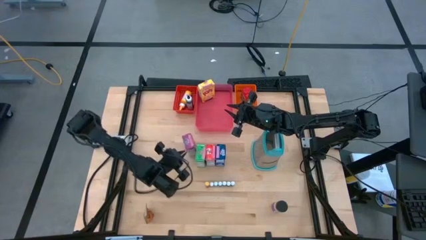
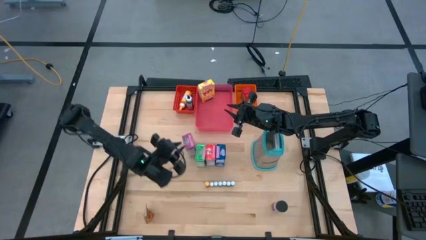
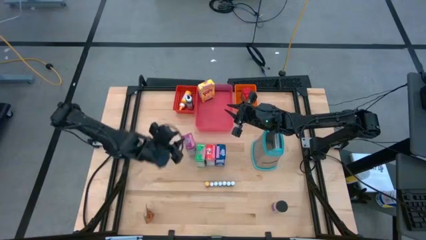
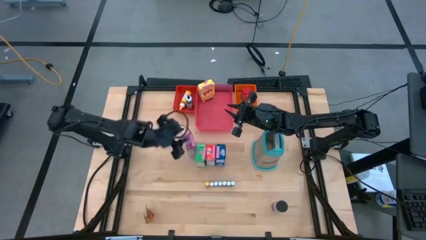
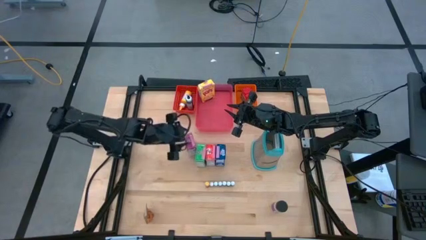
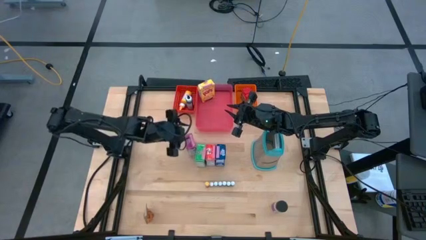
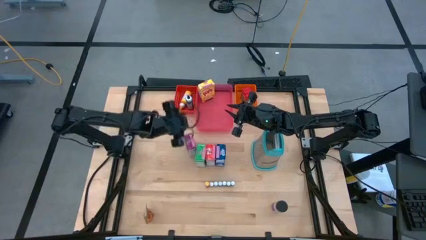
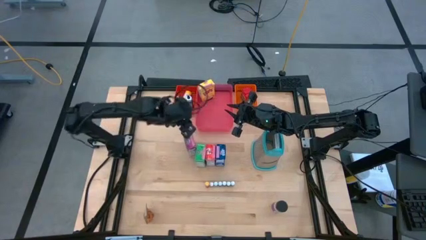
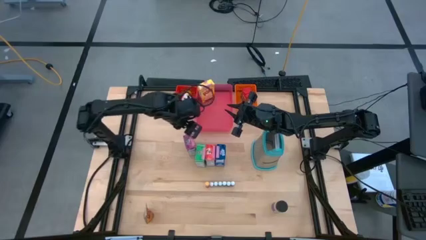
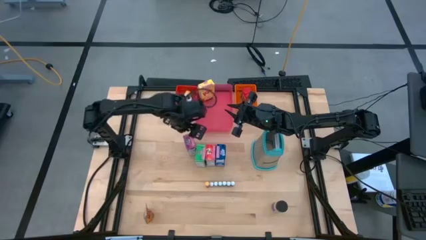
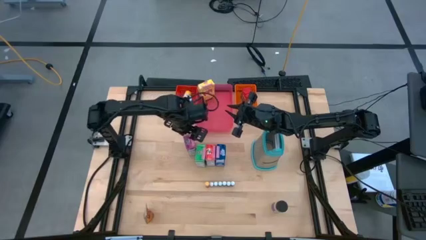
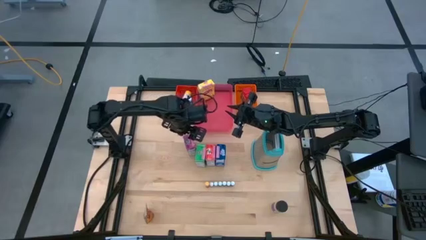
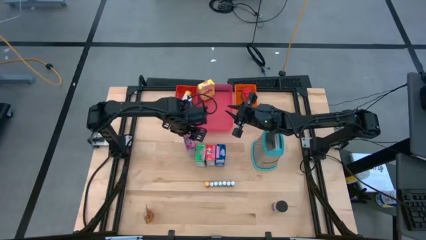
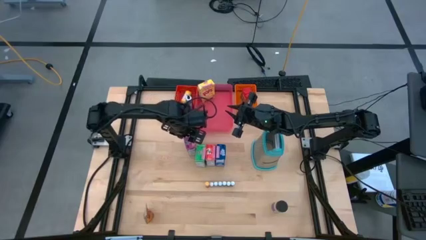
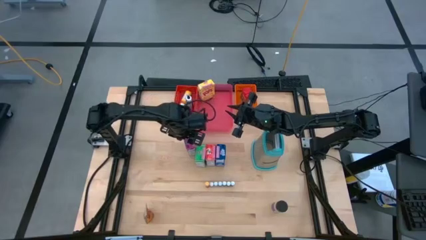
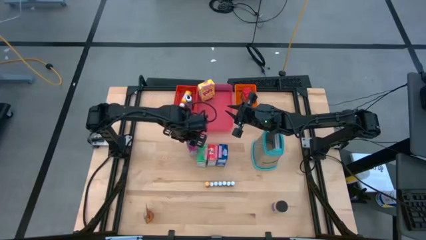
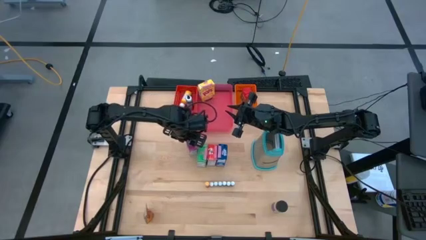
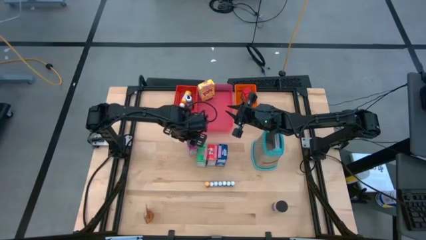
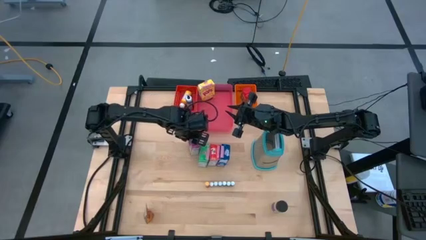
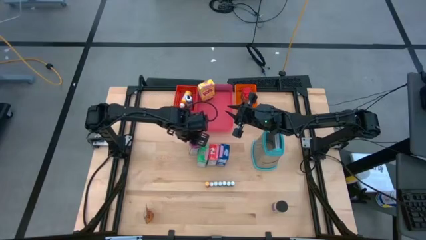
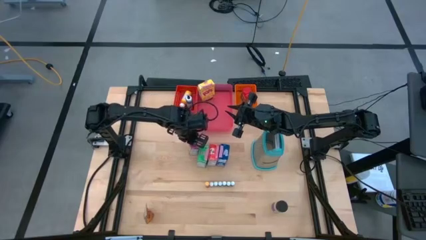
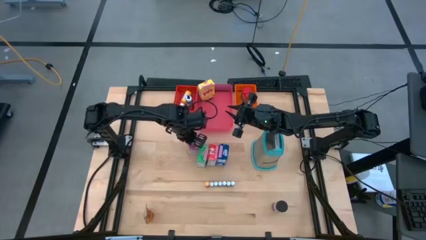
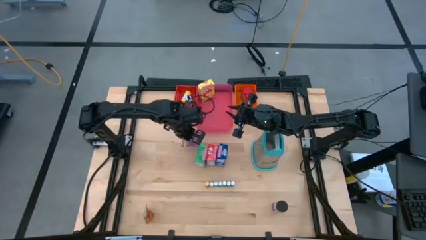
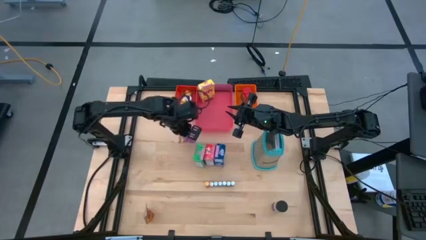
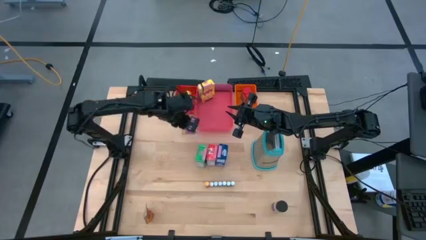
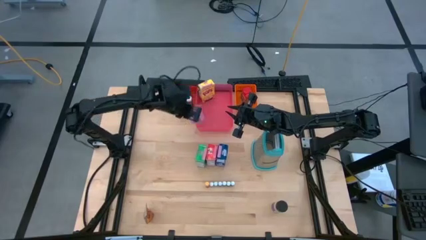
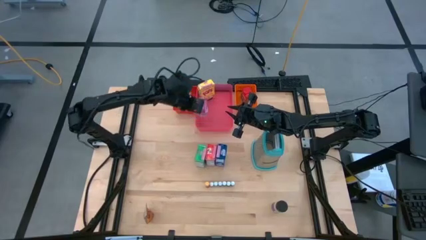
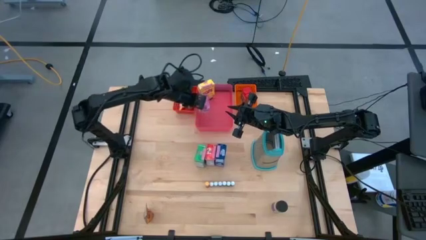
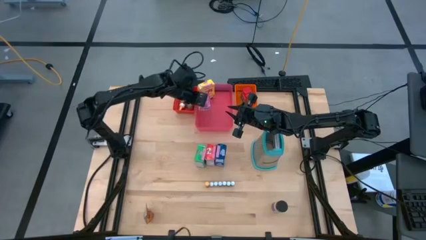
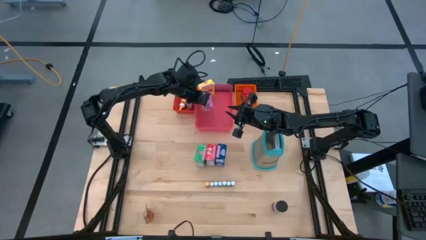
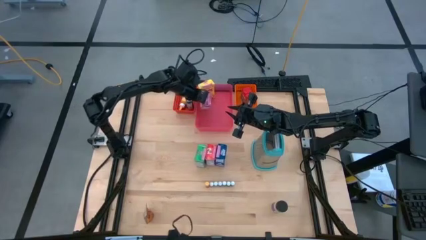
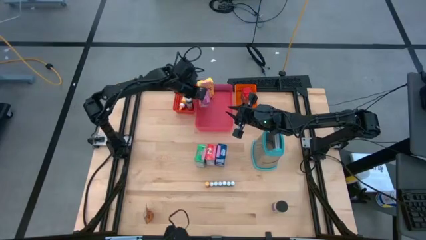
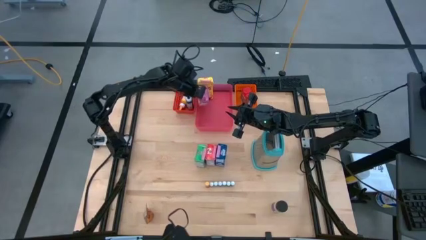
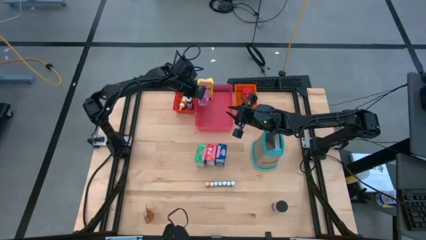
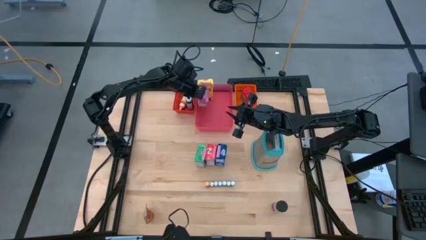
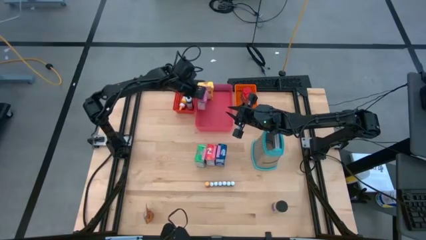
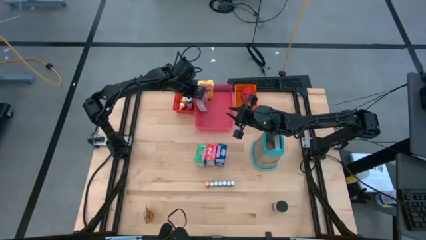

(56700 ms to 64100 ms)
Task: Pick & Place Kitchen Items
Put the violet cereal box into the pink bin

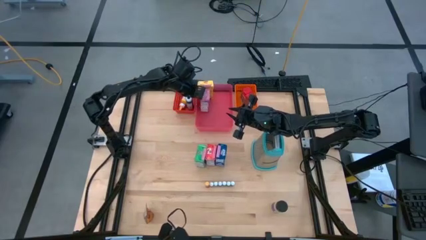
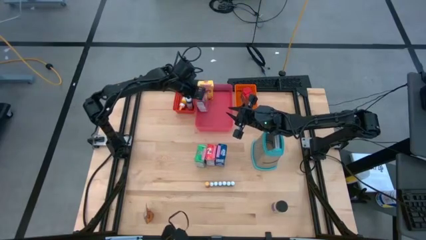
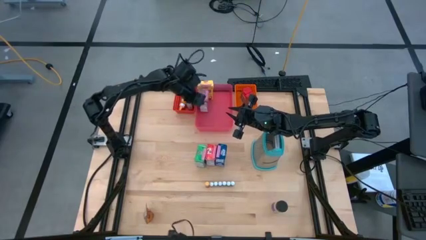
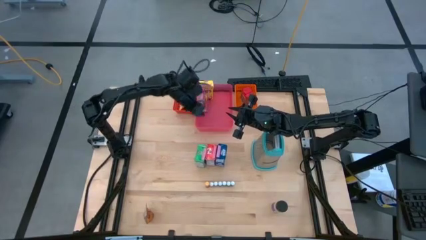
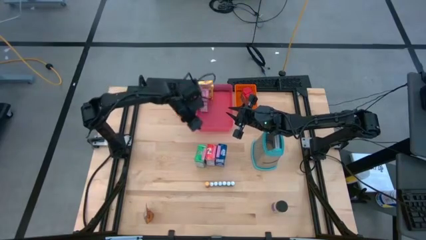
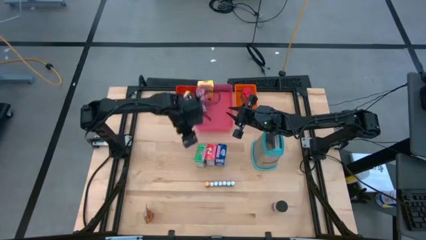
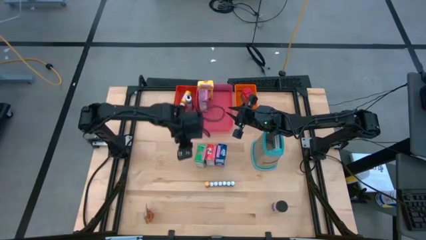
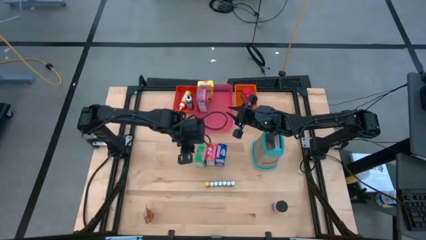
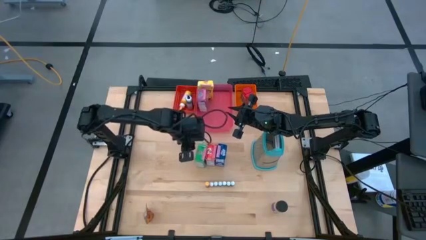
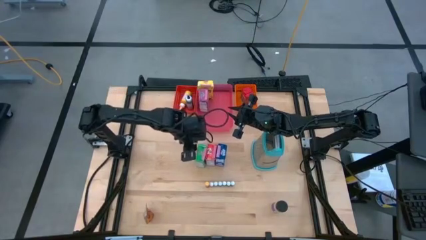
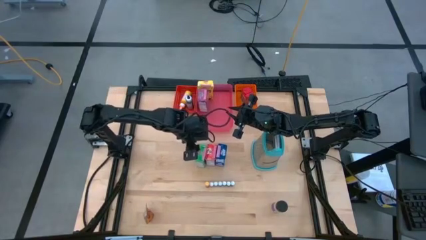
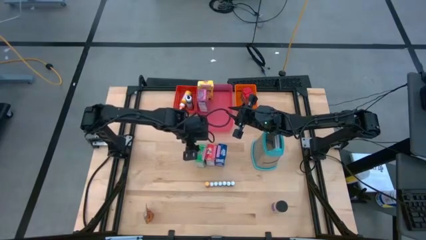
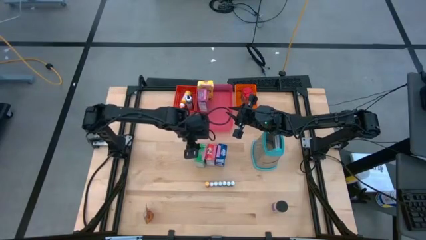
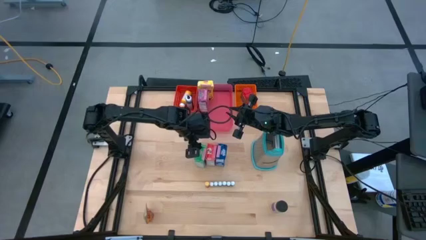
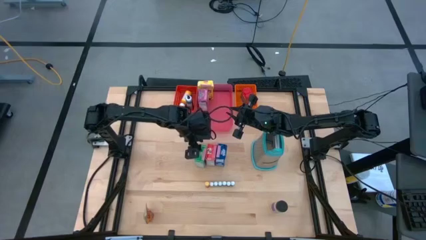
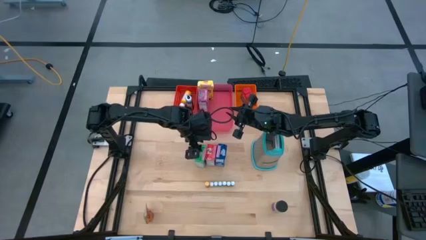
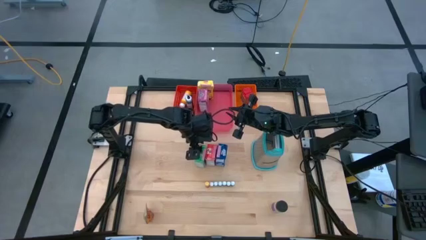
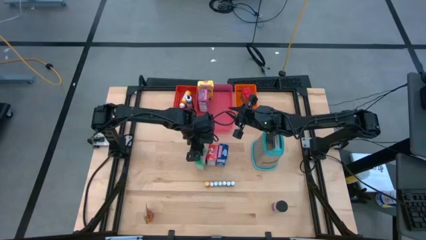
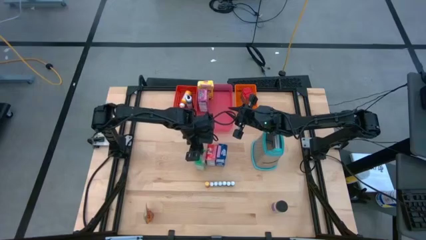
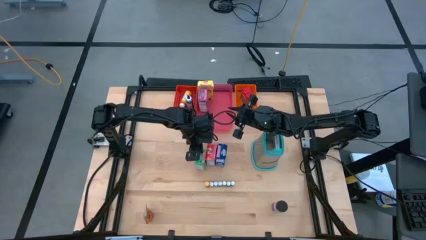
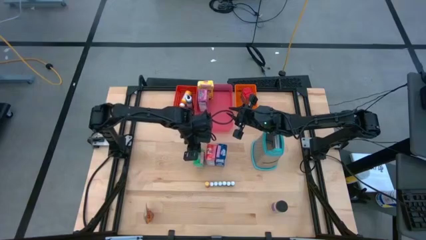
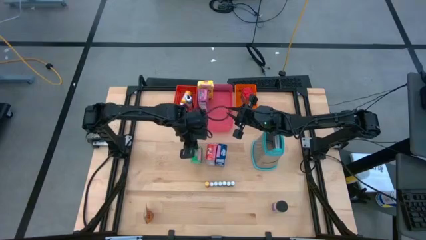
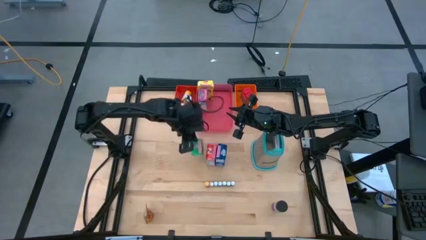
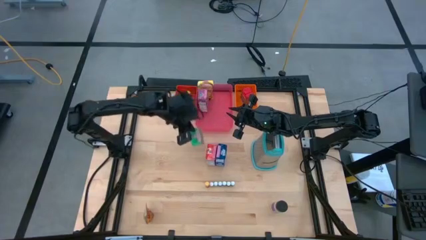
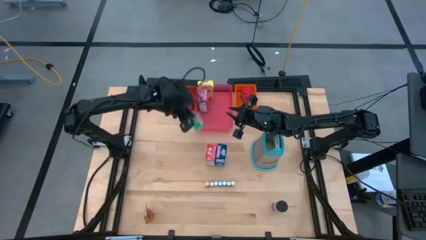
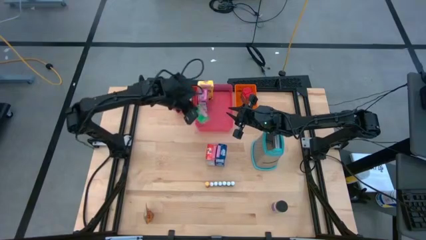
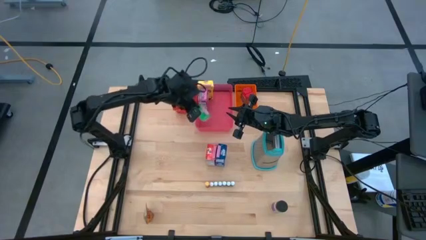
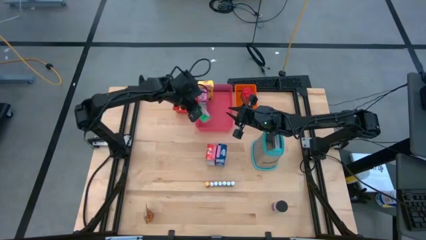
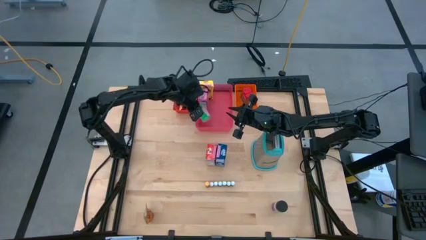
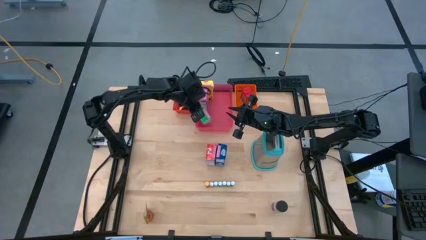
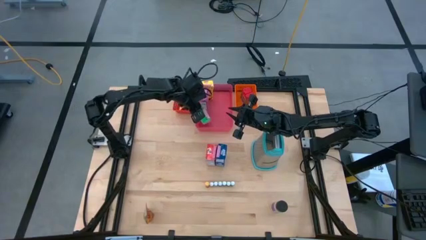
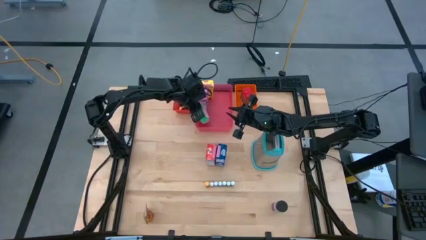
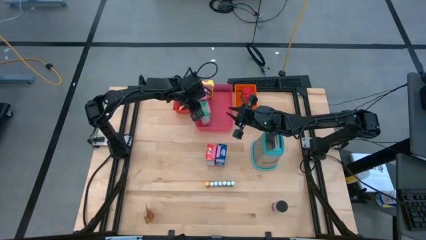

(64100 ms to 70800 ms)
Put the green cereal box into the pink bin
